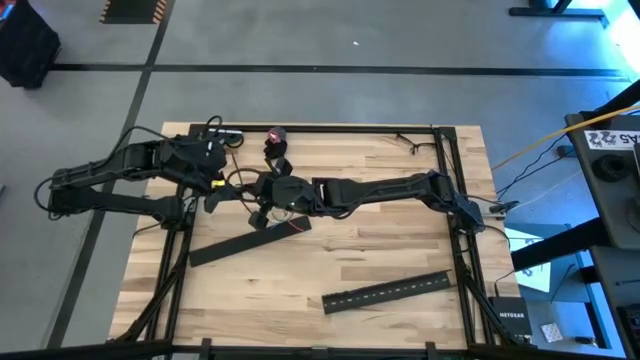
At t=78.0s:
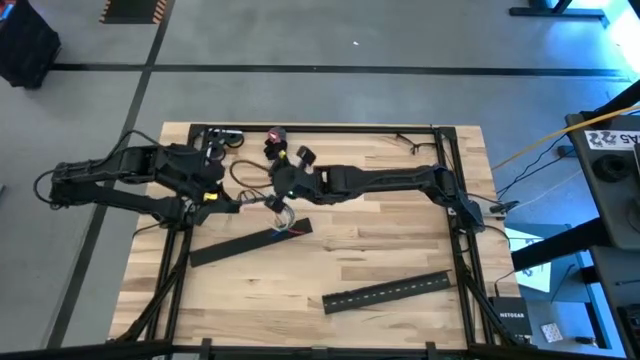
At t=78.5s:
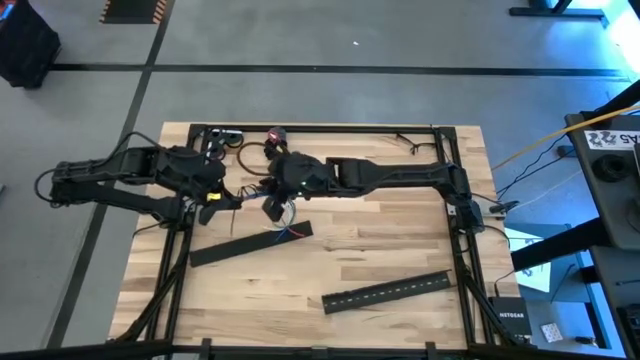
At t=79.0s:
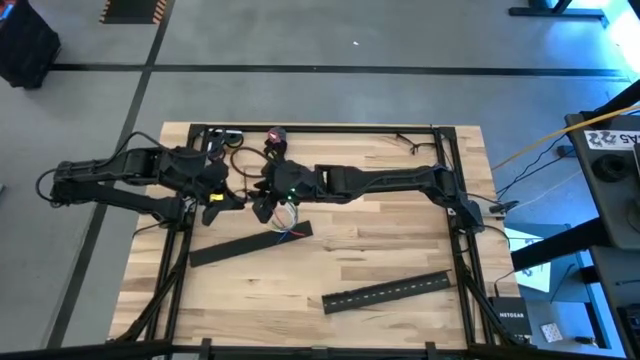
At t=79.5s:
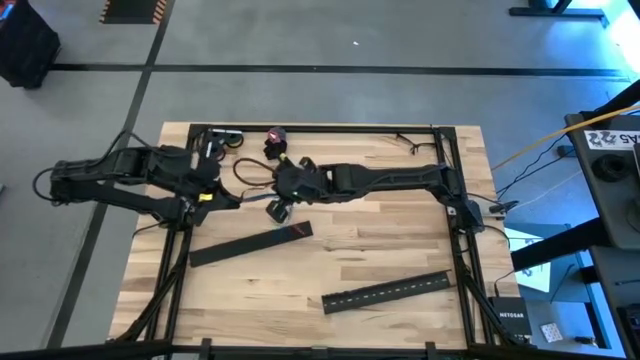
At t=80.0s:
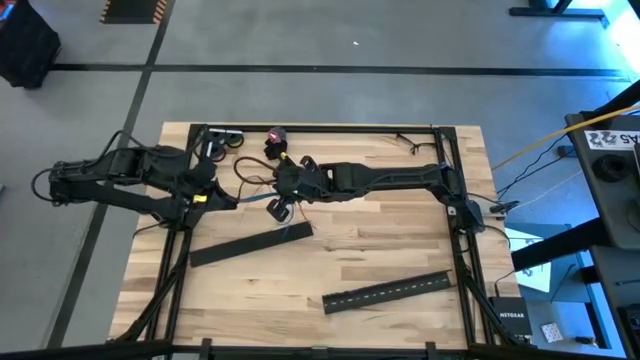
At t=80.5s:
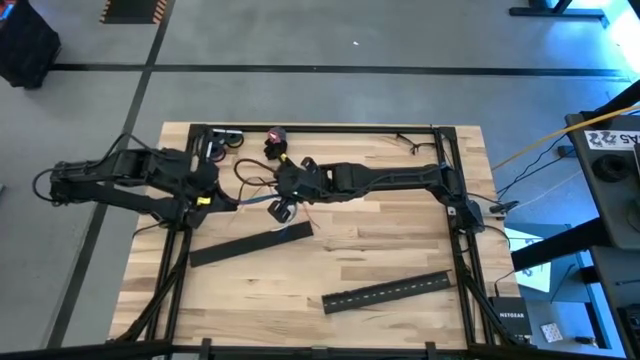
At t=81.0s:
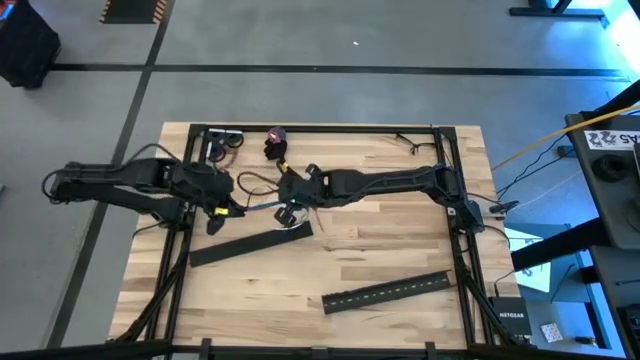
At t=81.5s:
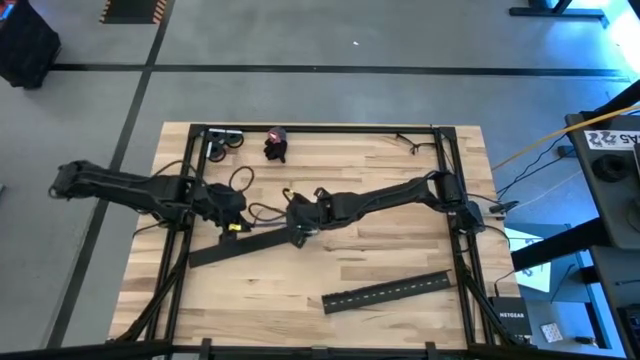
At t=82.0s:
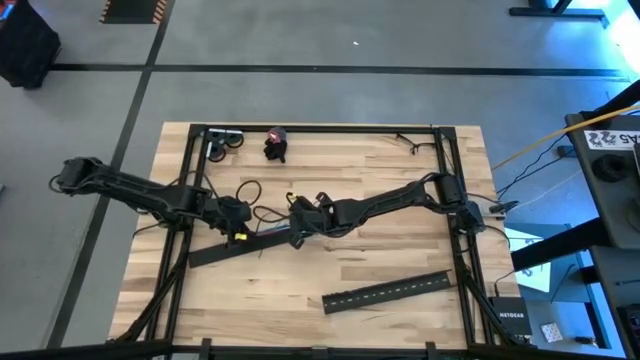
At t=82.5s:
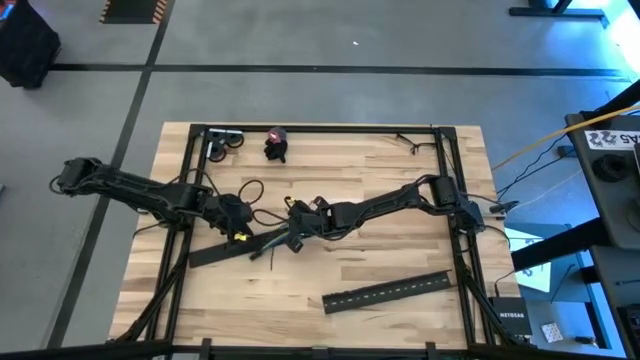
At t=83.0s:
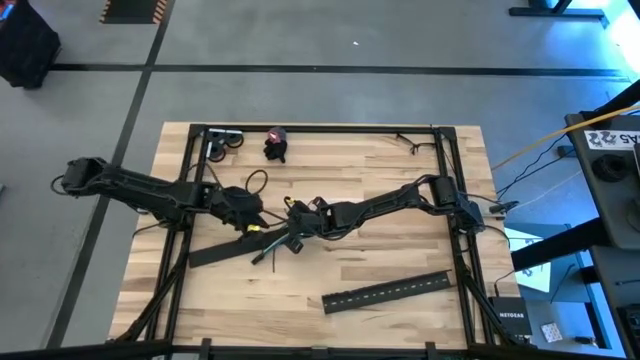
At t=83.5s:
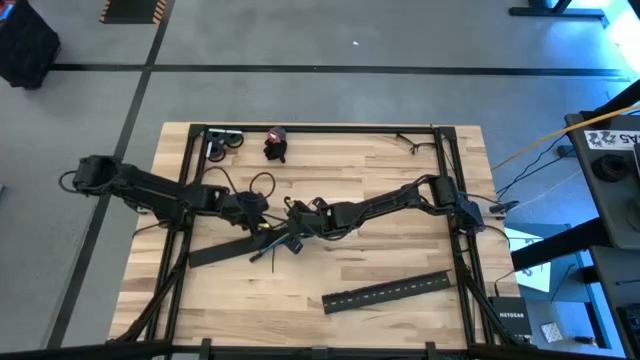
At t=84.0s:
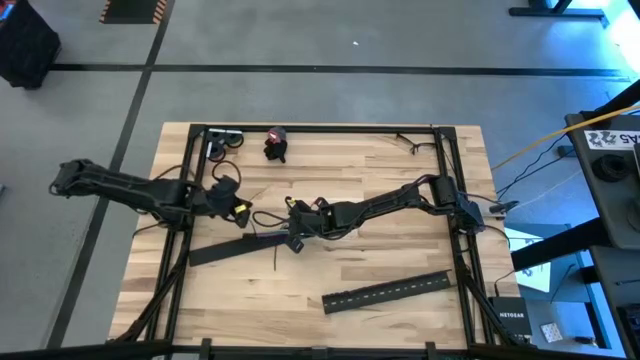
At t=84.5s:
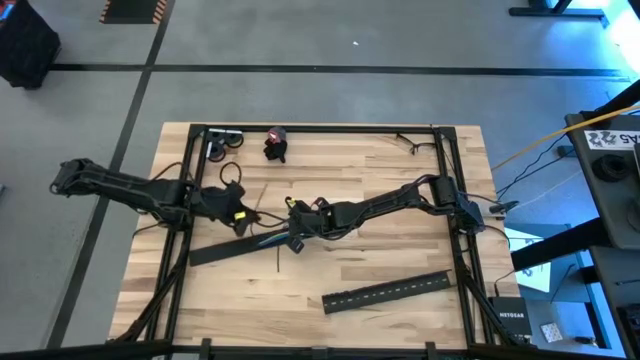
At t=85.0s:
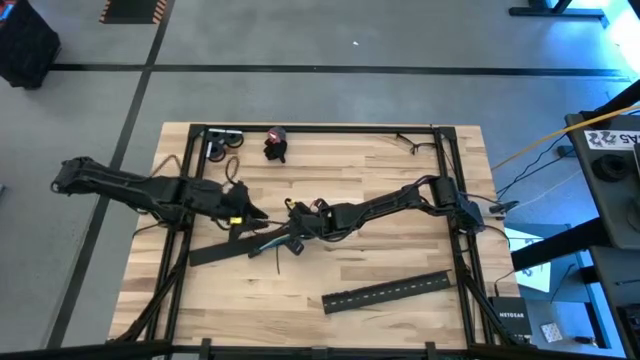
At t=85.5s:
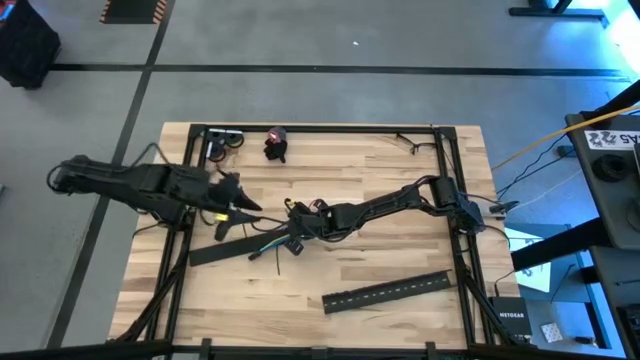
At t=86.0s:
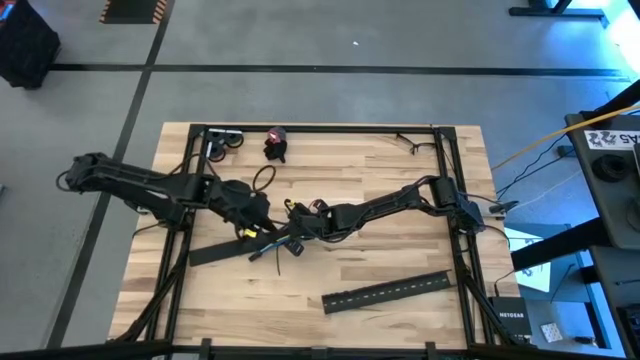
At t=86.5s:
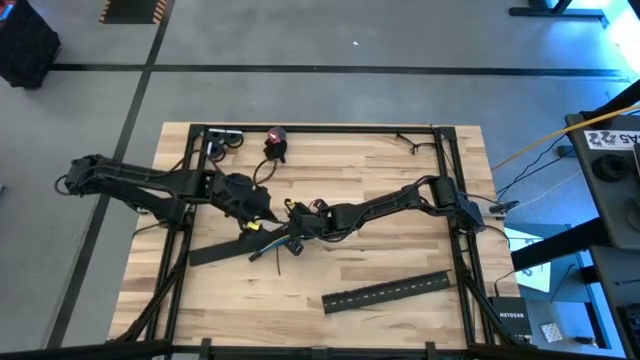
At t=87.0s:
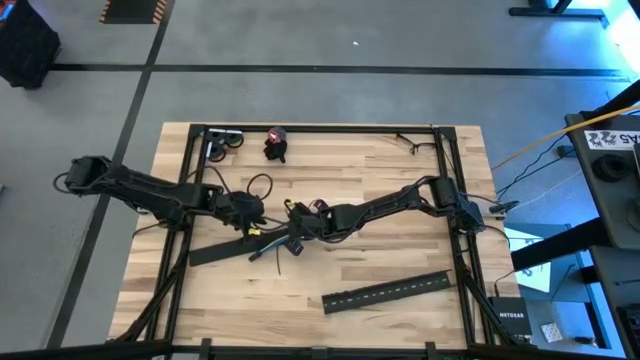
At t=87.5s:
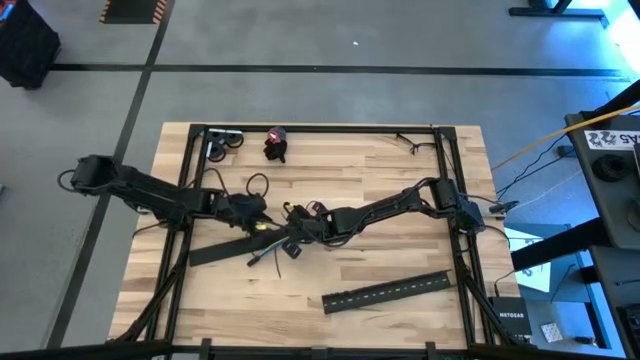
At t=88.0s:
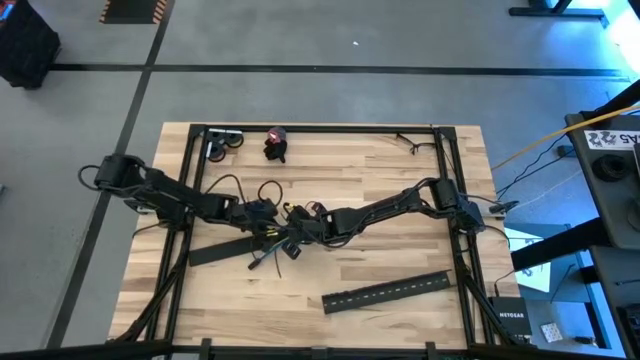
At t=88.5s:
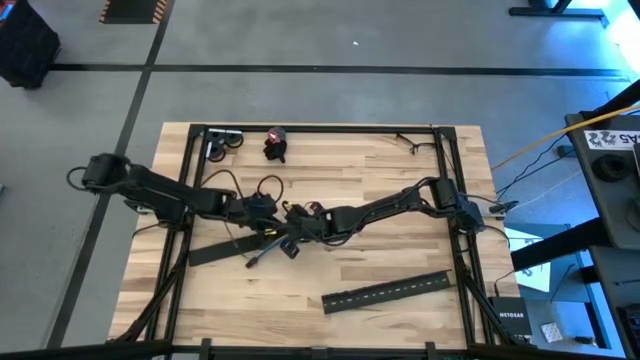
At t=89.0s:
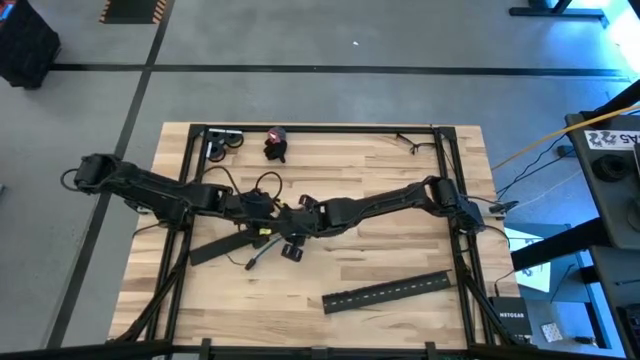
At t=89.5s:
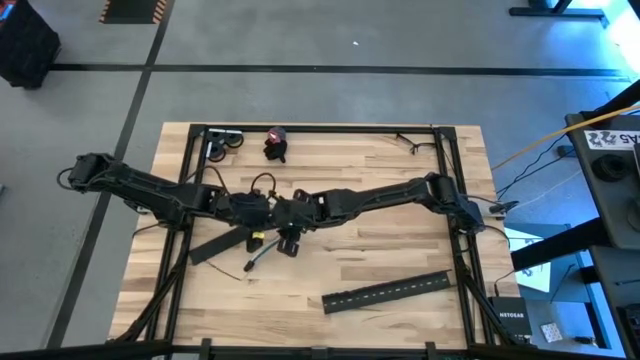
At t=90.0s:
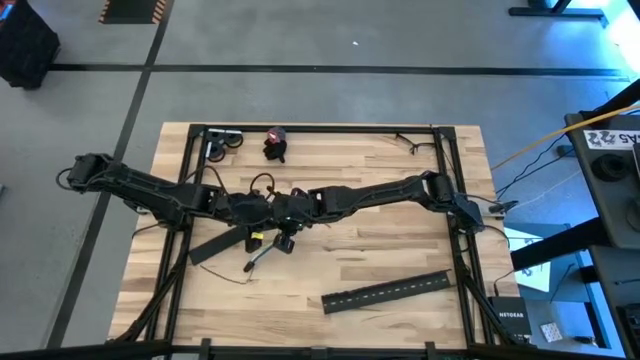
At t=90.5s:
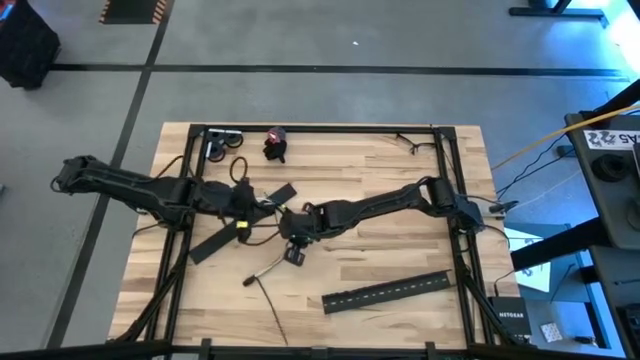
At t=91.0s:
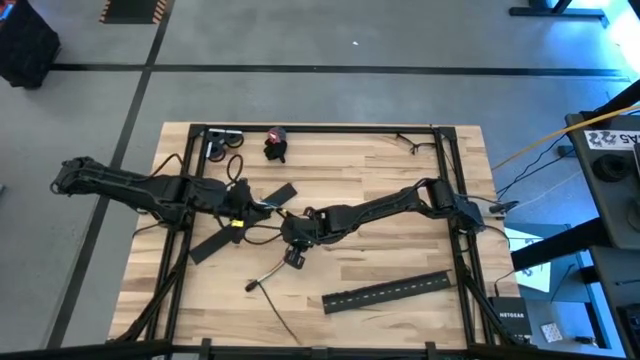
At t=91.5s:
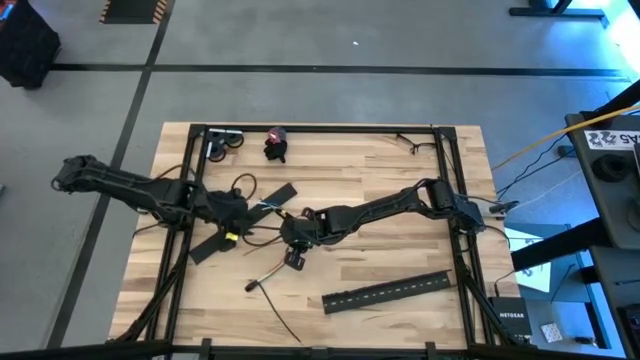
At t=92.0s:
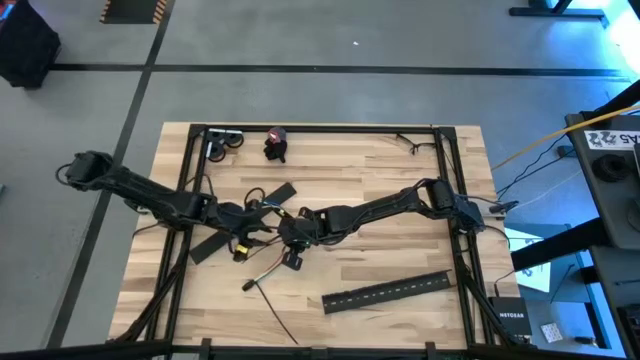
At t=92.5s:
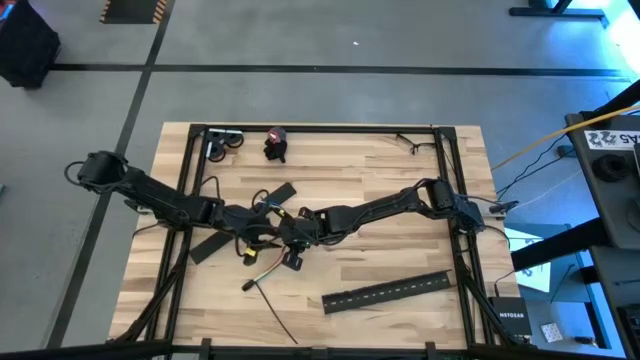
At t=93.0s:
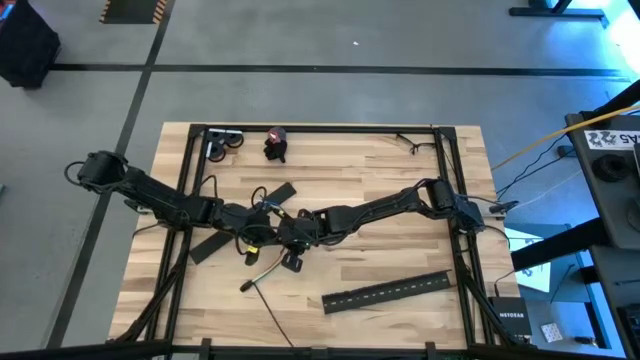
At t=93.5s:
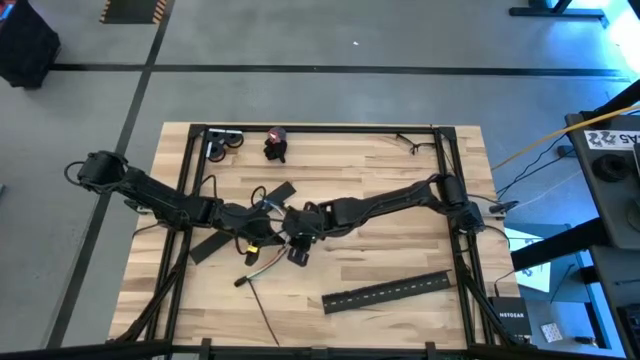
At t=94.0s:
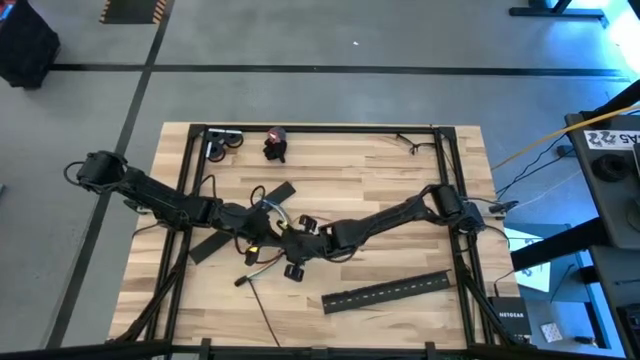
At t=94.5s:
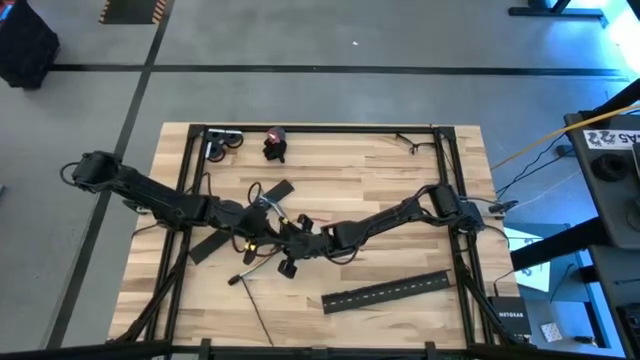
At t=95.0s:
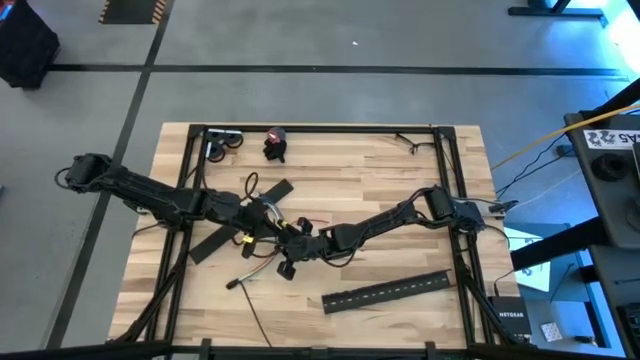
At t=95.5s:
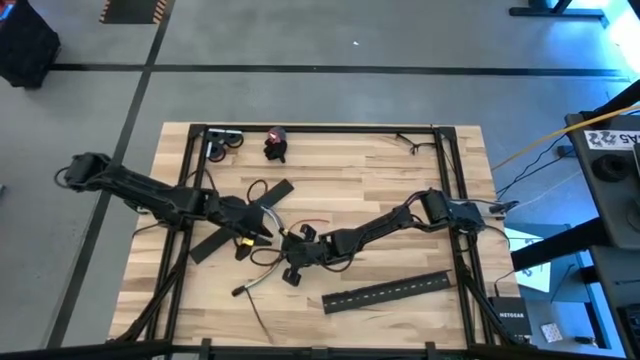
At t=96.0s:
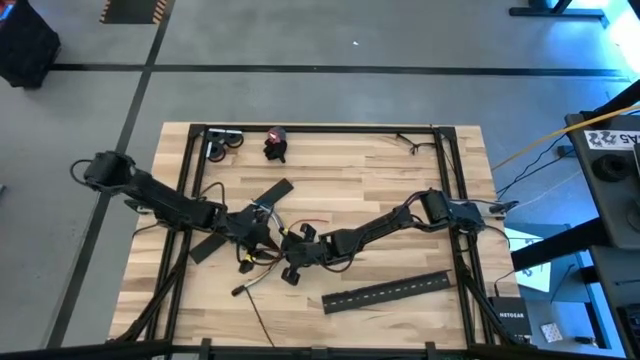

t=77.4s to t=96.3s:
Task: Ziptie cables
Wrap the cable wires with the black zip tie

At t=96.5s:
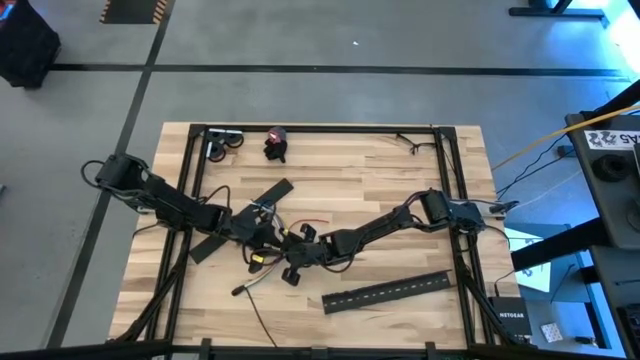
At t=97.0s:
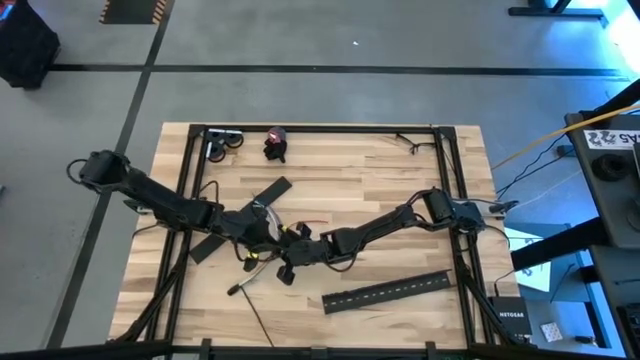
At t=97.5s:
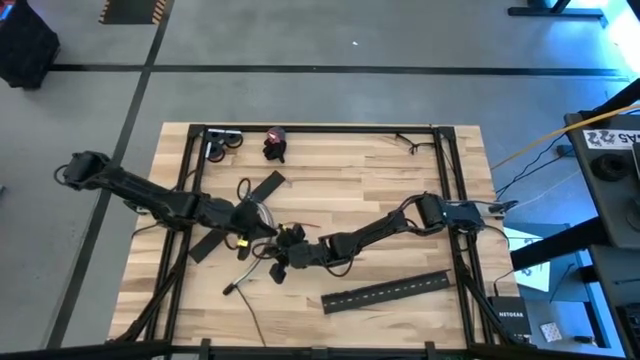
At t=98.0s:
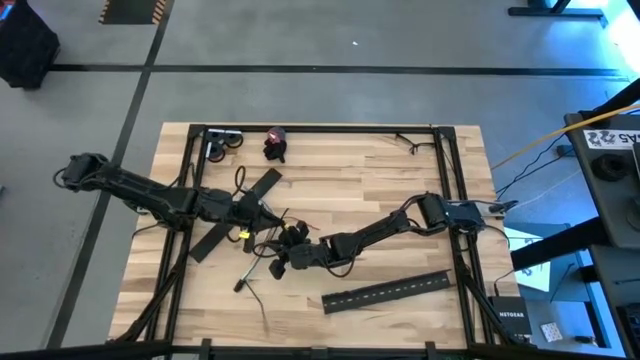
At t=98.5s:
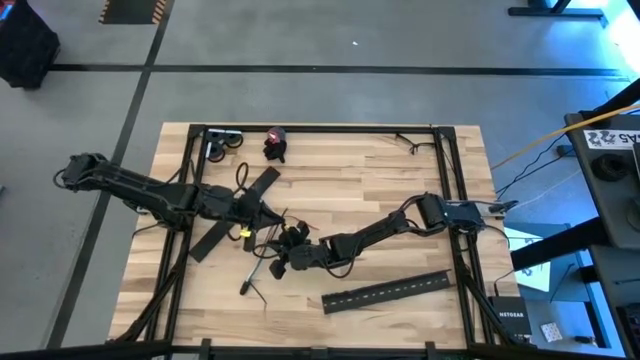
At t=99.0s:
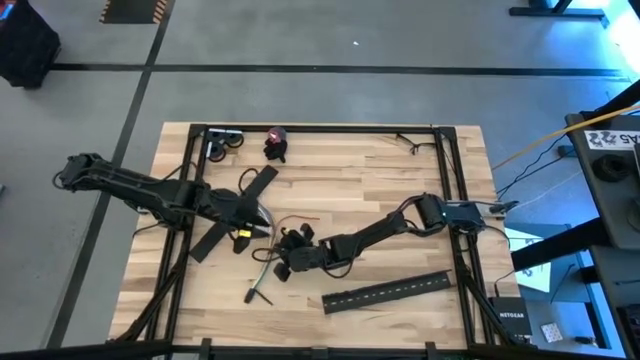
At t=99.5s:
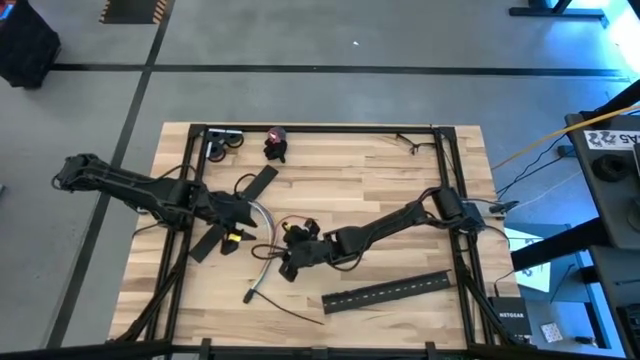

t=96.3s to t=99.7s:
Wrap the cable wires with the black zip tie
